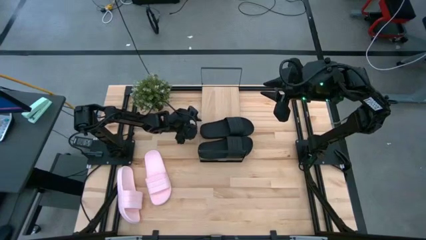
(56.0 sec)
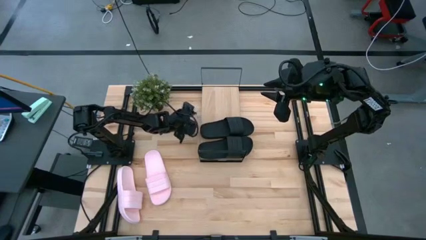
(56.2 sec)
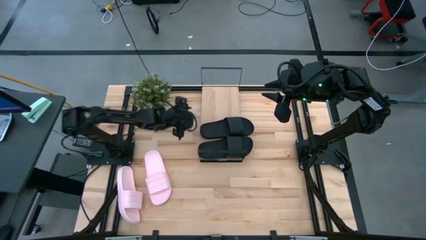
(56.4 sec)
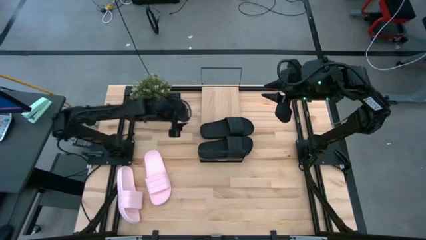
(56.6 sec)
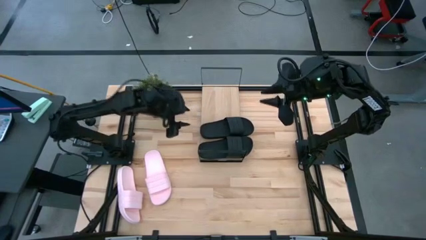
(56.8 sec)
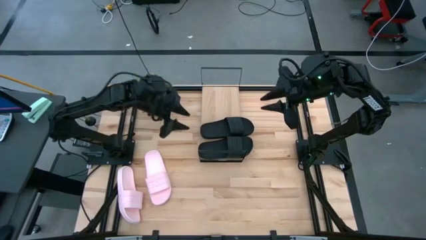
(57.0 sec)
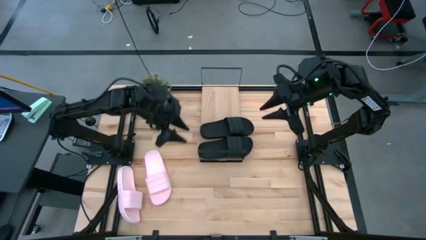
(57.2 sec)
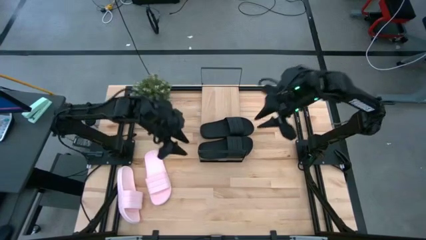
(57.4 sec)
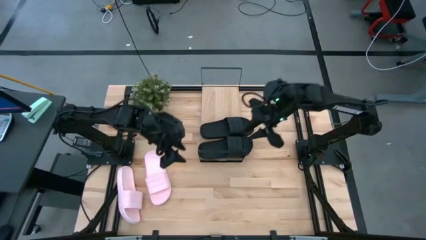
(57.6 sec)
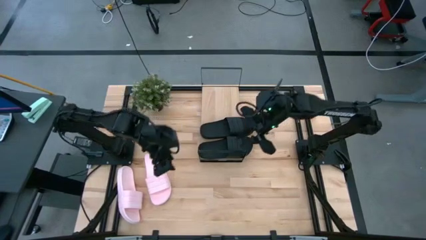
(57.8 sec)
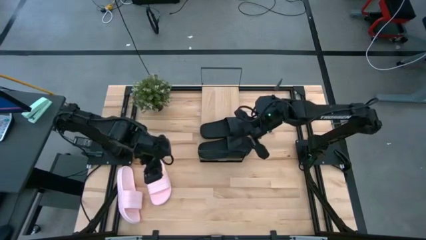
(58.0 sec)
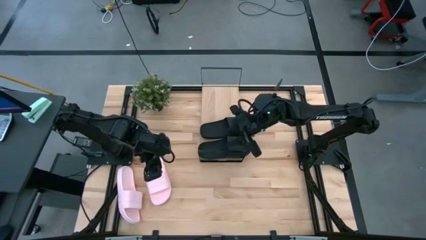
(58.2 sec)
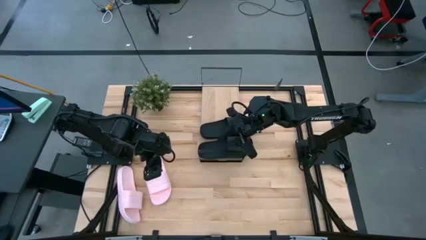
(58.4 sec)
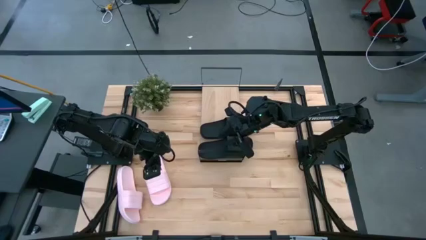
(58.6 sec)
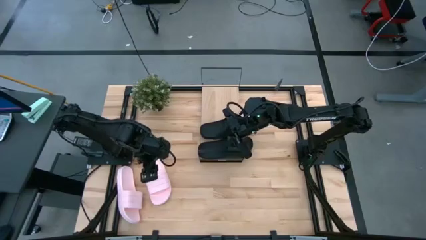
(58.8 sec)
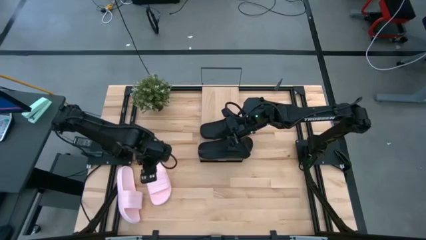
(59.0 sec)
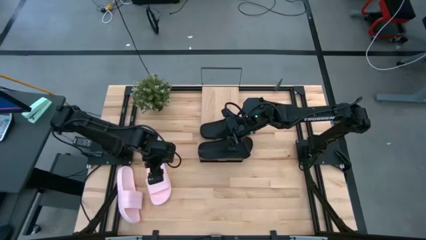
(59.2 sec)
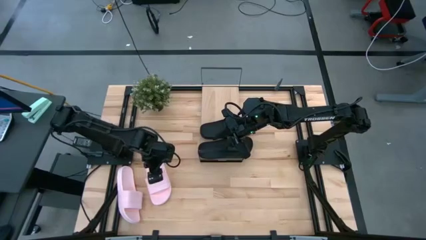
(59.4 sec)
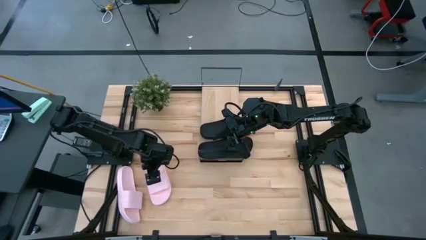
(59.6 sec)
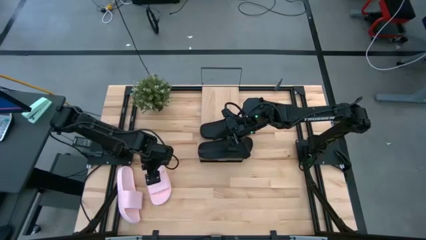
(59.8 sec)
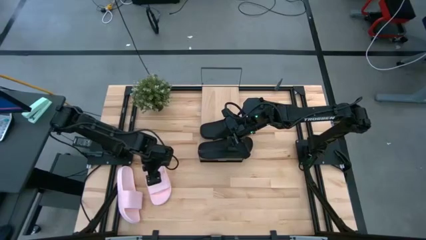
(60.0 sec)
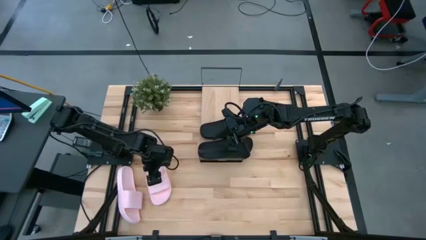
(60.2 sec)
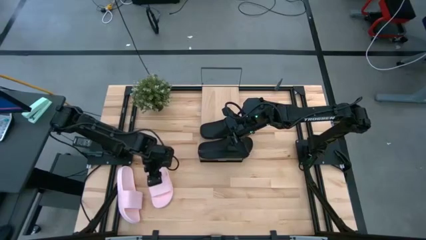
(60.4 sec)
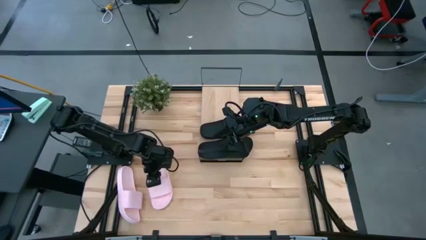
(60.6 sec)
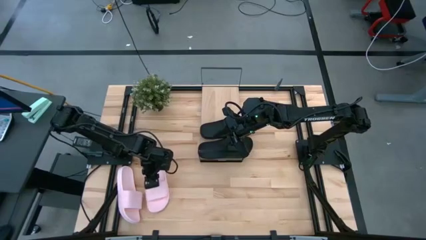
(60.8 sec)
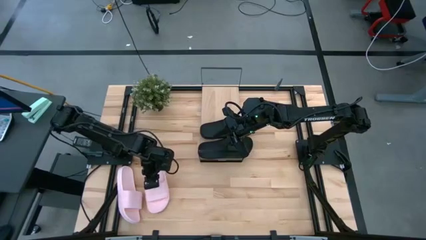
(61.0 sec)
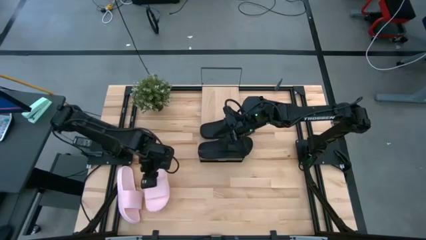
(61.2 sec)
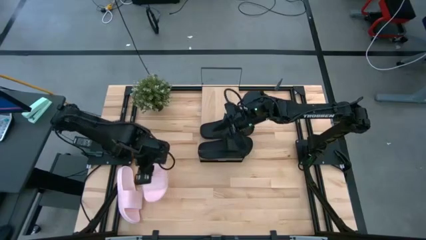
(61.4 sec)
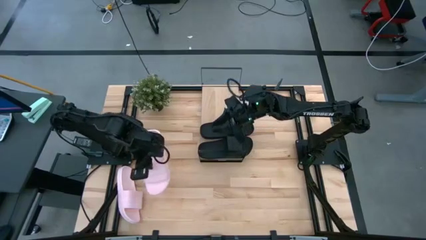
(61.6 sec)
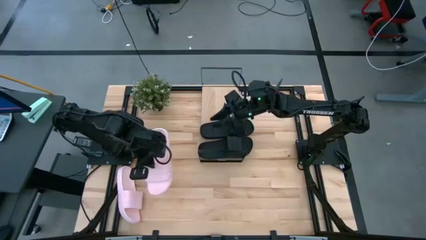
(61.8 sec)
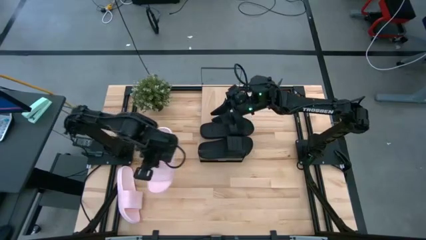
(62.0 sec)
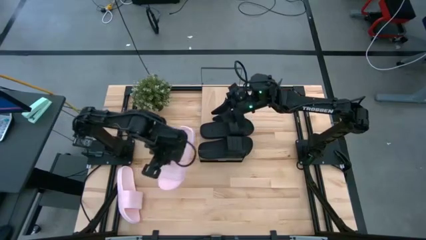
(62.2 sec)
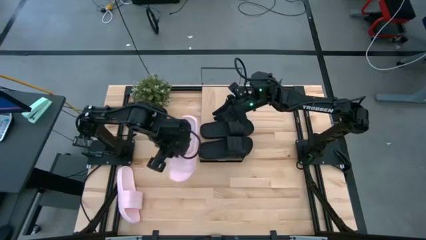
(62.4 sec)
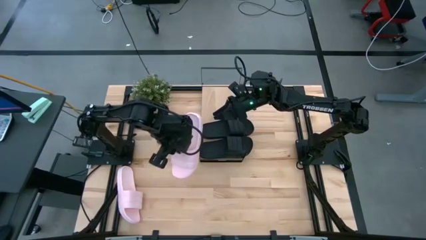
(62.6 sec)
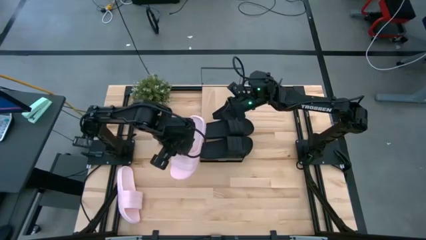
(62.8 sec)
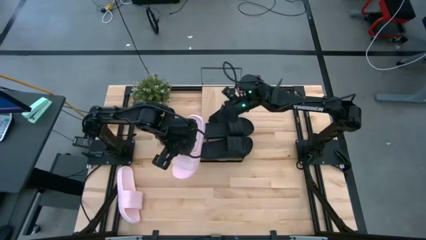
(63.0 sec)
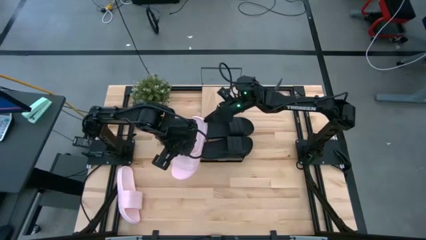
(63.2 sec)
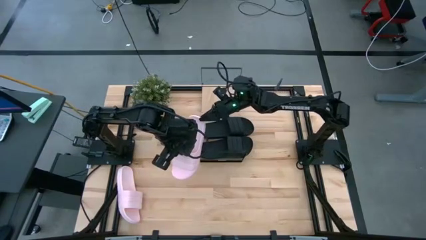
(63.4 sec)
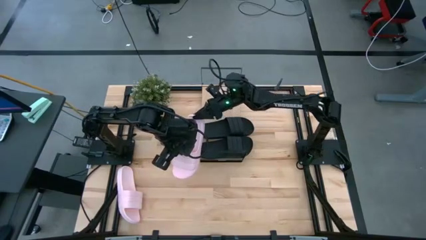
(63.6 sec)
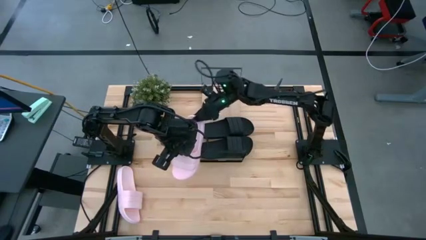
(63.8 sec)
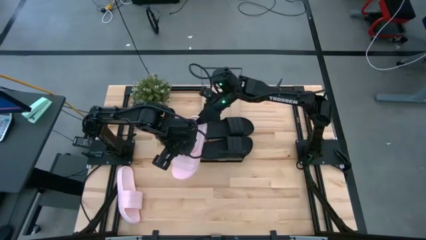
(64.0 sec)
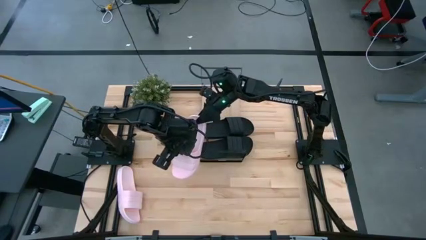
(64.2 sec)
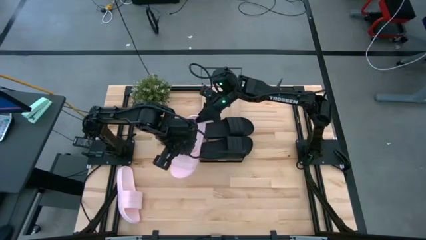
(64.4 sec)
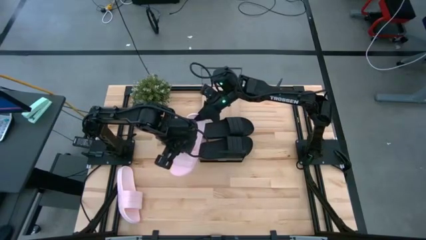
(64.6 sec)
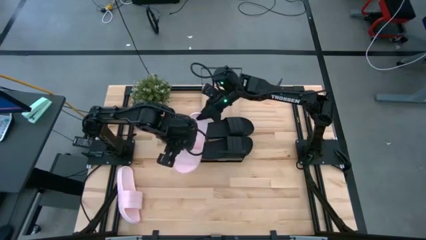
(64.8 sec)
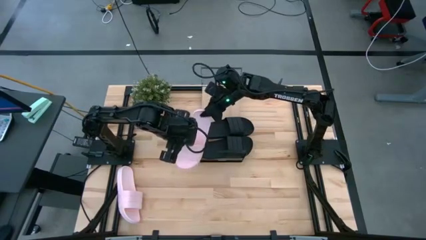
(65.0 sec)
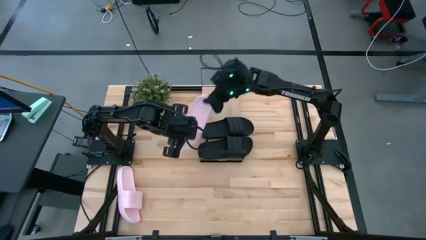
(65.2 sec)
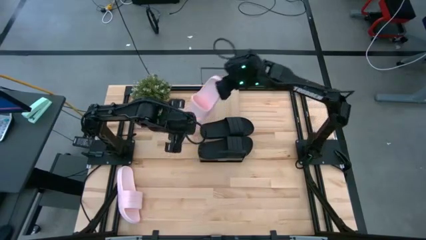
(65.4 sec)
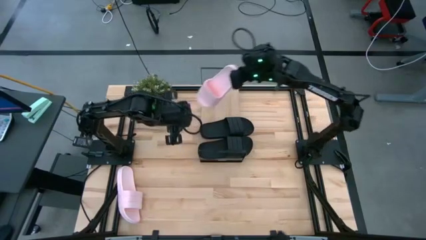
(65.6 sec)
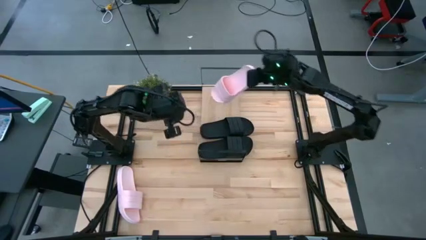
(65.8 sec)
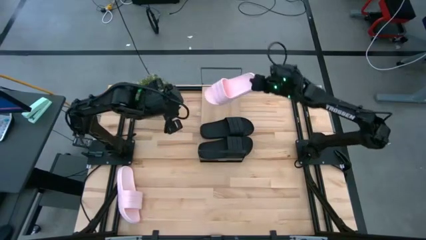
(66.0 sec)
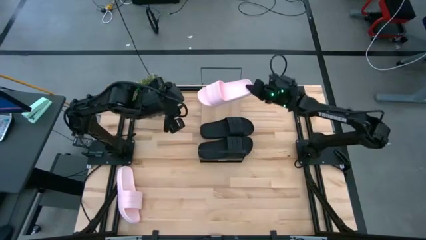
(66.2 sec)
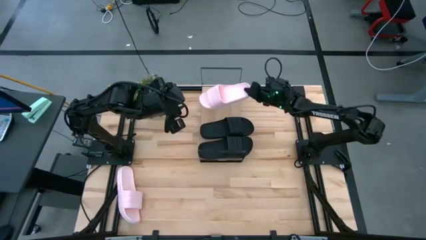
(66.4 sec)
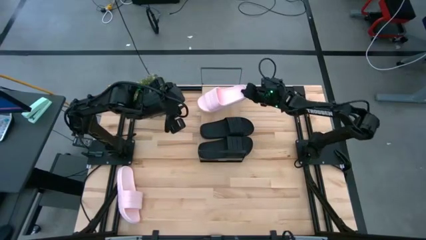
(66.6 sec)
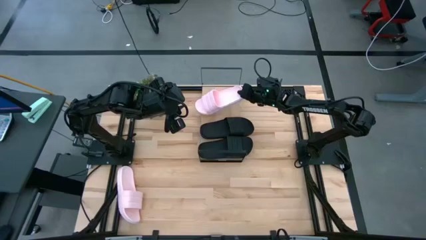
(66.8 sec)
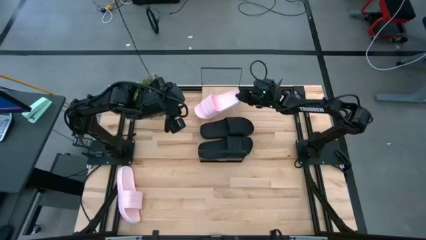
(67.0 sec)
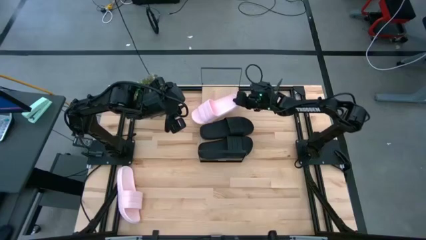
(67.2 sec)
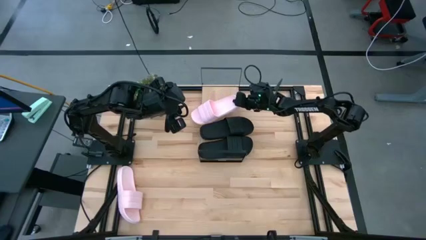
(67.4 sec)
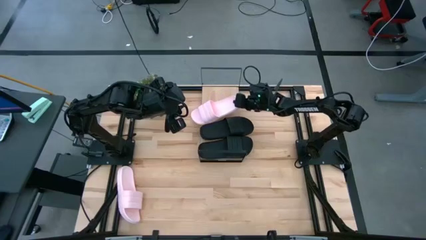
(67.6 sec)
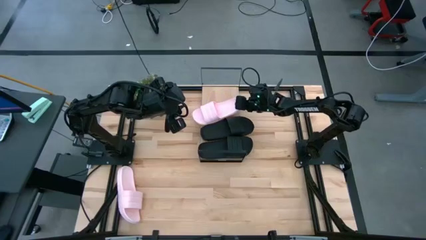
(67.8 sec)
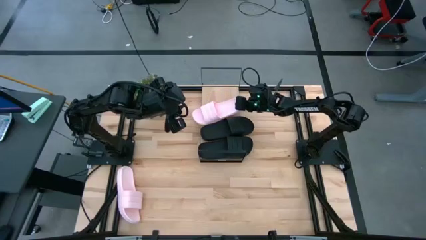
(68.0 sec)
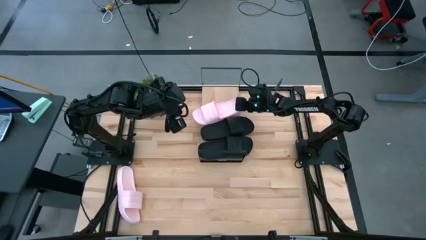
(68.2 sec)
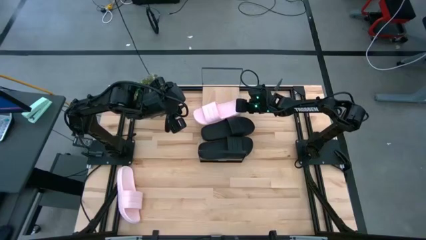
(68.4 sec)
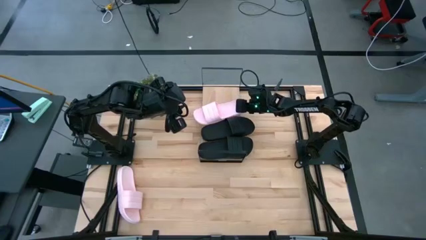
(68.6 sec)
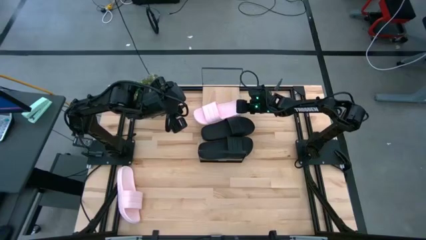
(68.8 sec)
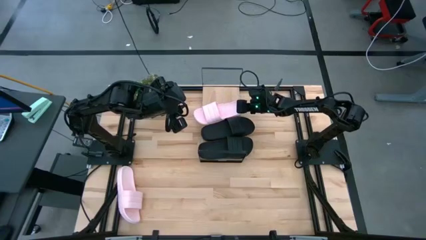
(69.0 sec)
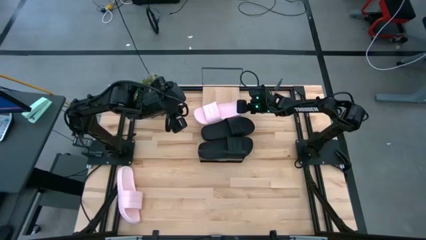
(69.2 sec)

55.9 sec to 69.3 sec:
Task: Pick and place slides into the shelf
Put the right pink slipper on the shelf

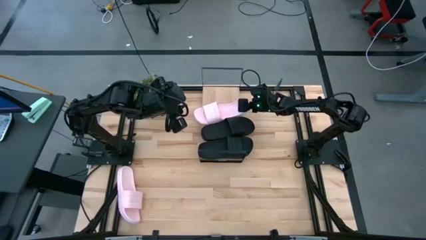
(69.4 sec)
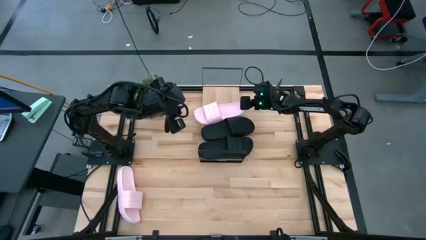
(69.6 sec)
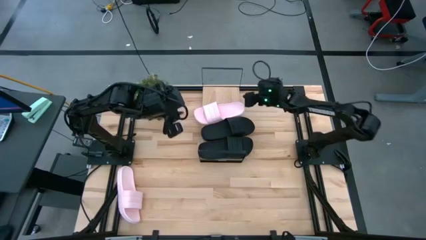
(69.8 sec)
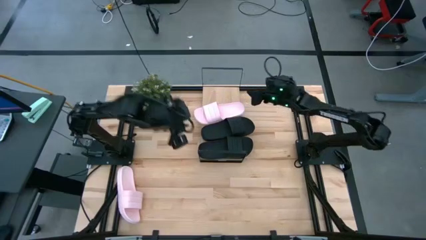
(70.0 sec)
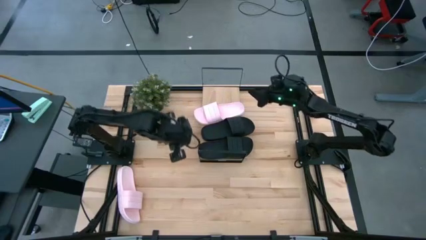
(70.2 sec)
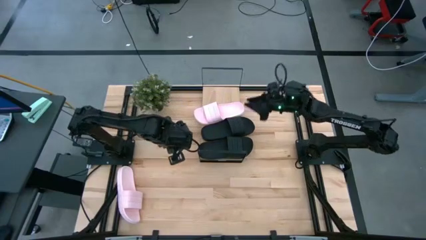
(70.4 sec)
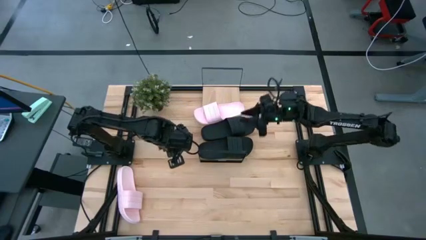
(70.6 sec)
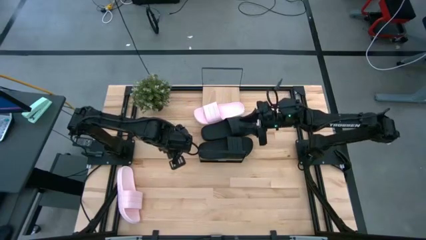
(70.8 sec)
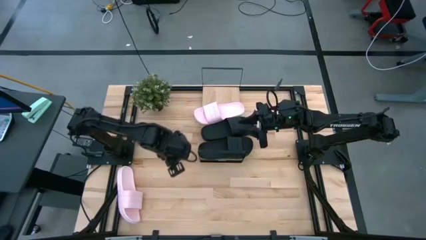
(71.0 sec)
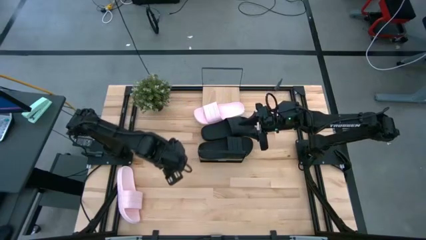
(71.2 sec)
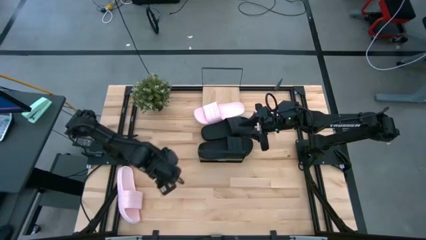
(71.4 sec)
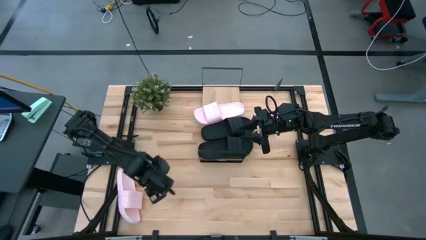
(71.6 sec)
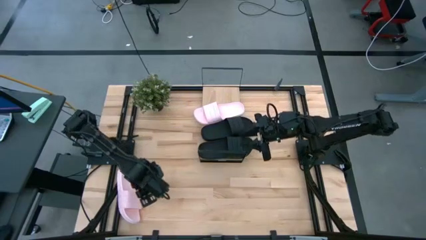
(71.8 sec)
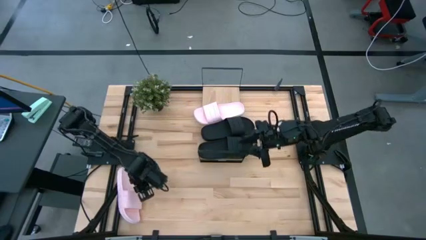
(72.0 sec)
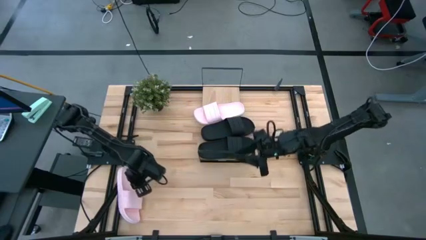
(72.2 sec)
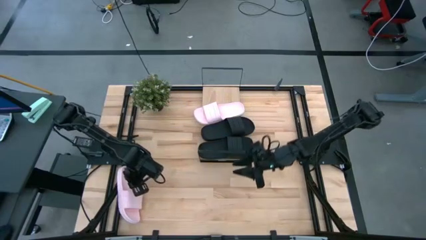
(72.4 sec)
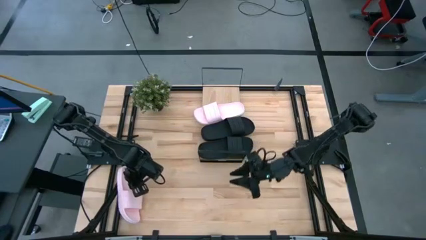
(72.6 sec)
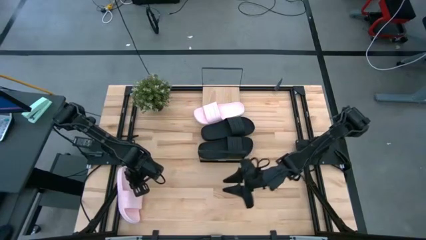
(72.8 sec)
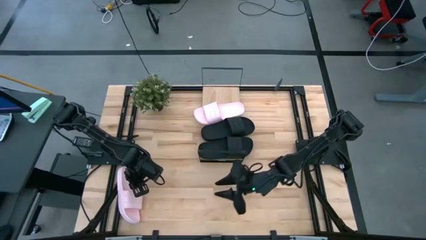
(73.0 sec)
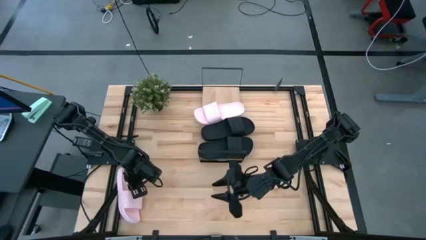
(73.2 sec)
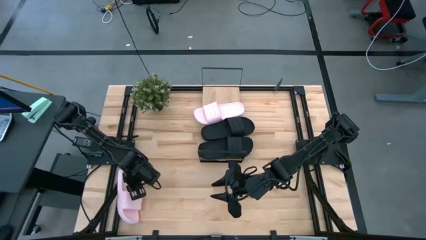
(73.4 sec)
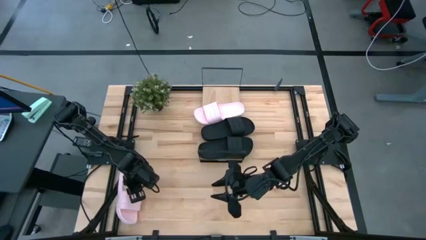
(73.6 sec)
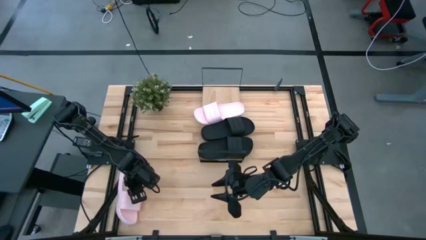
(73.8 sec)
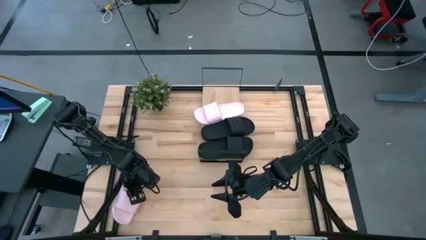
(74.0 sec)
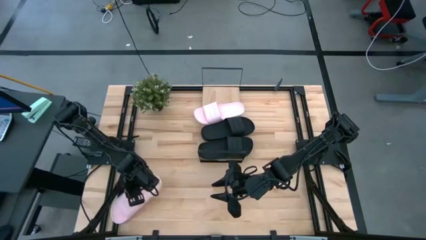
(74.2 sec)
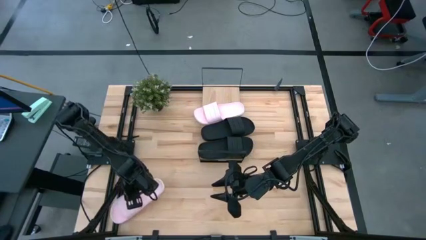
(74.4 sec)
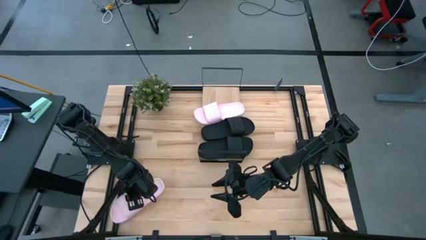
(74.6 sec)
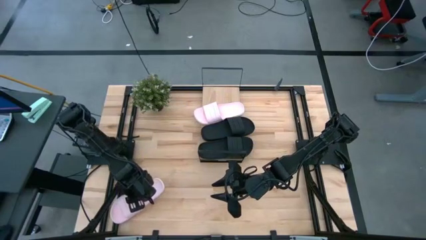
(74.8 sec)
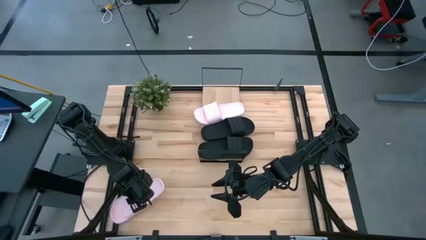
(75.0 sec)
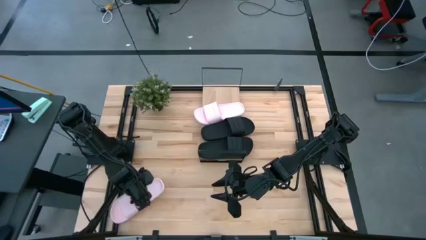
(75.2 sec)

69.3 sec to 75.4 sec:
Put the pink slipper on the shelf
